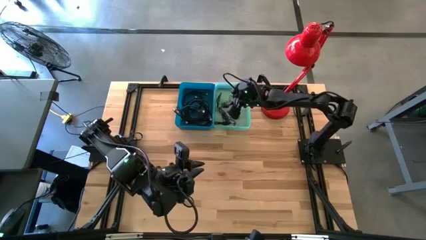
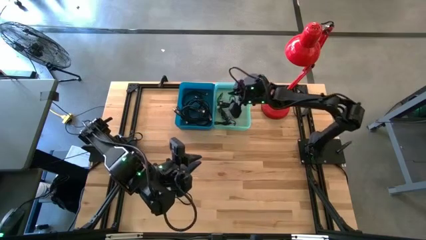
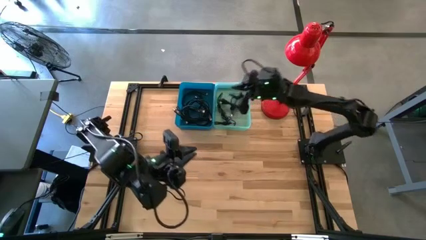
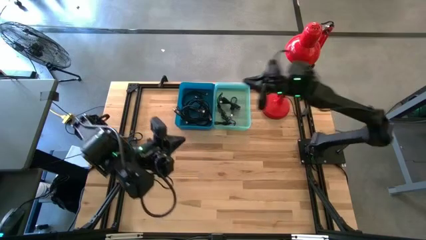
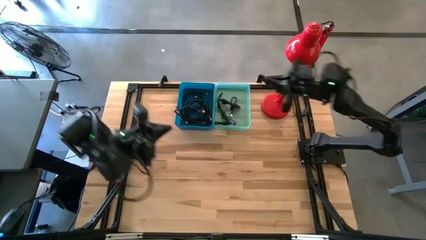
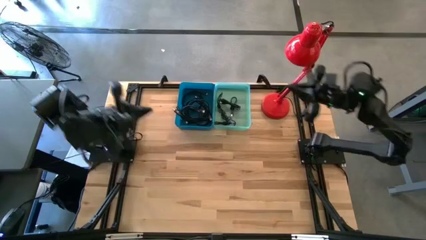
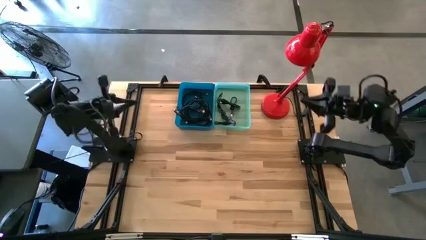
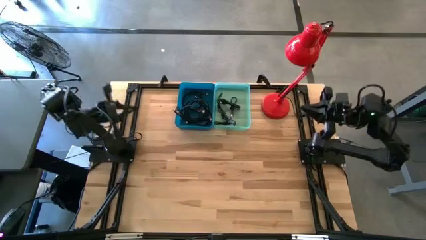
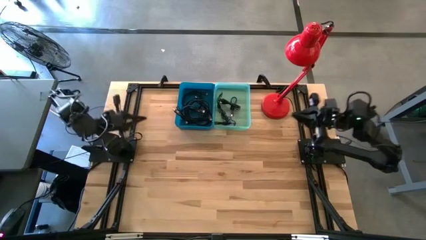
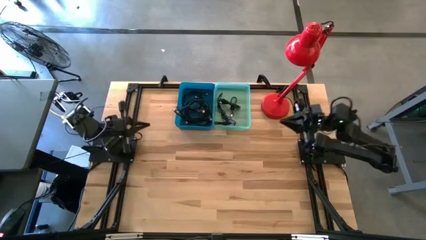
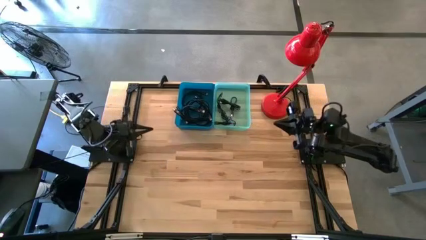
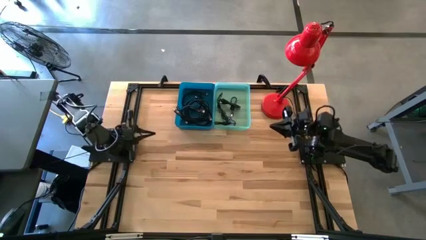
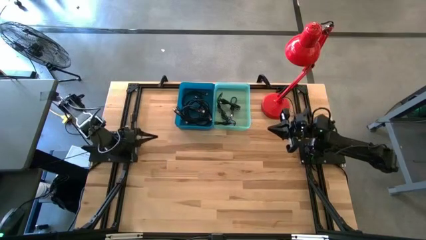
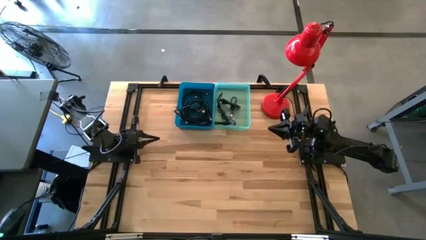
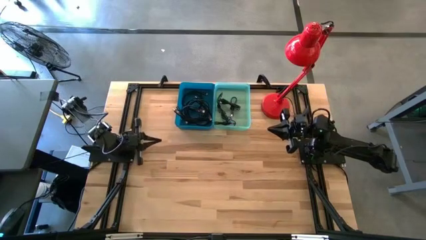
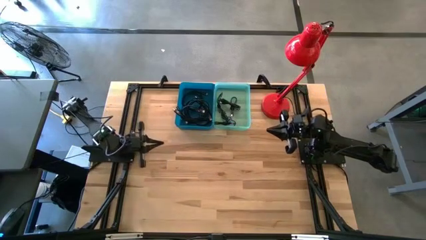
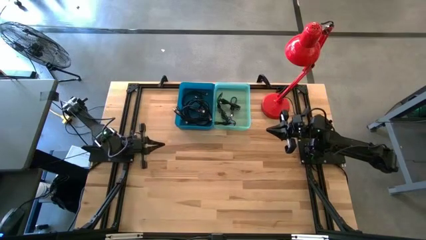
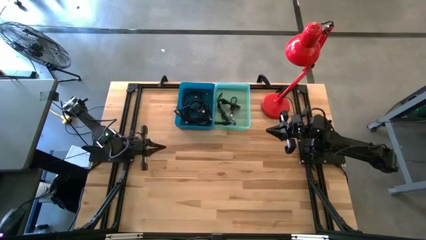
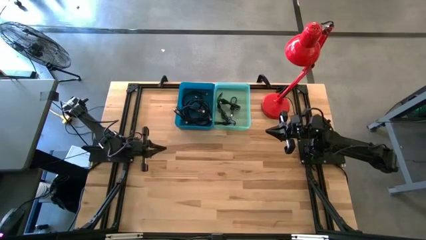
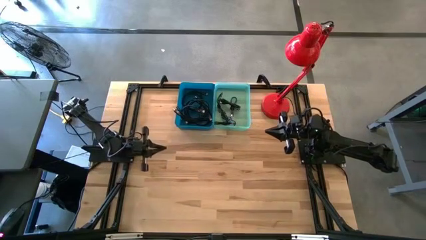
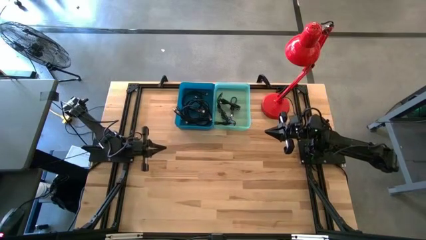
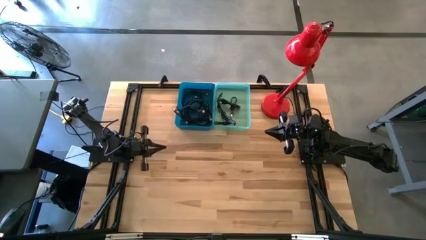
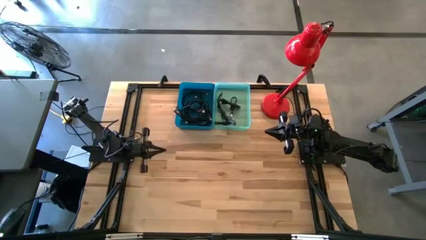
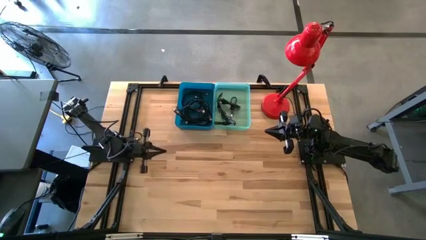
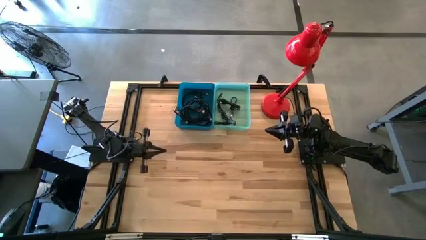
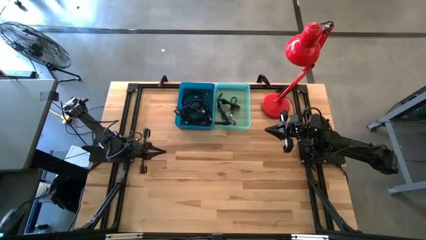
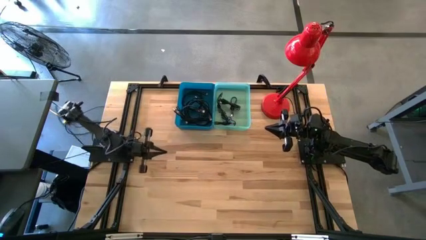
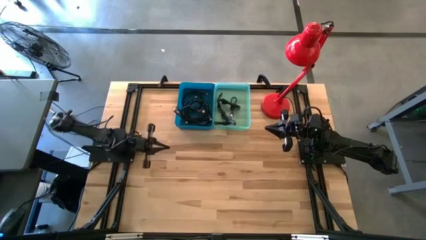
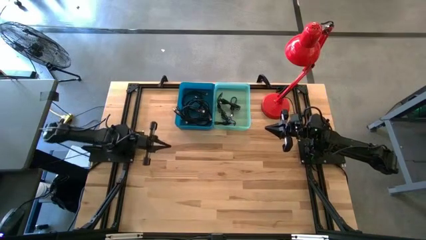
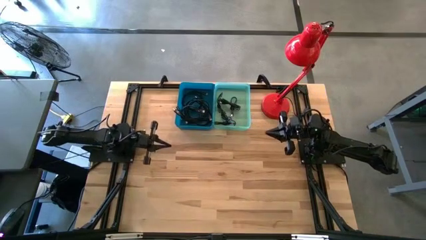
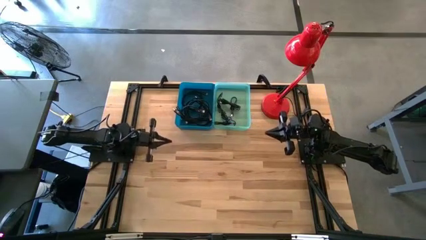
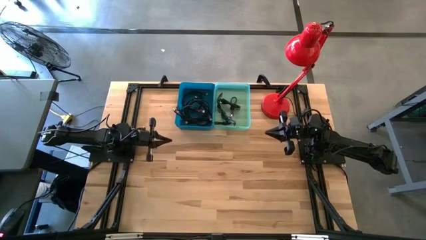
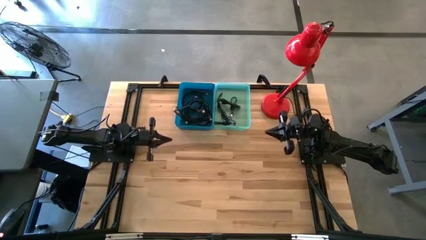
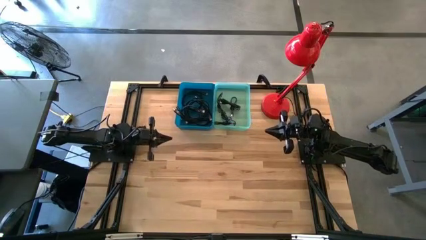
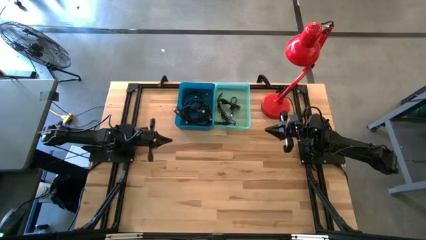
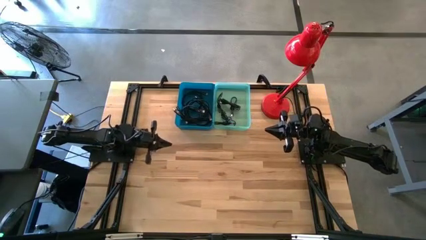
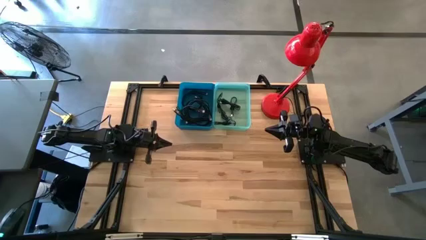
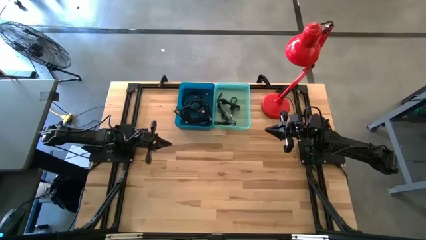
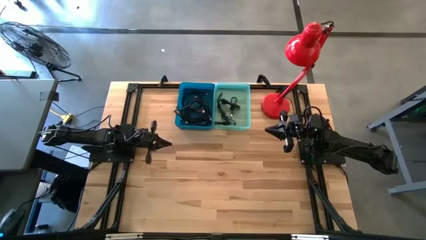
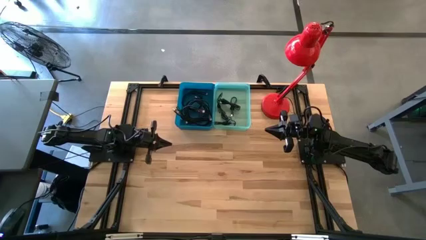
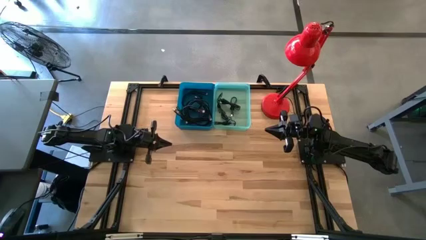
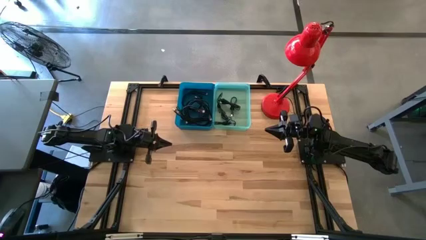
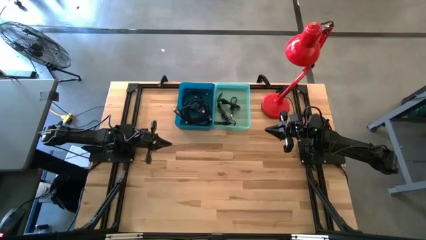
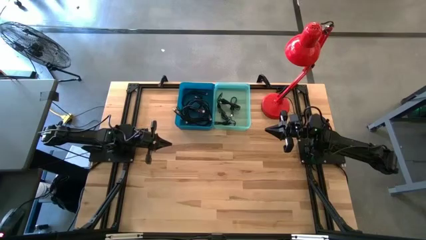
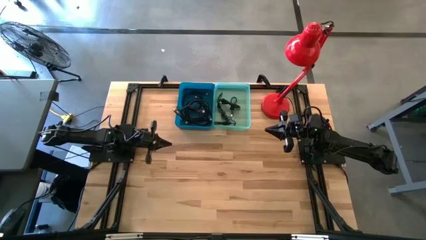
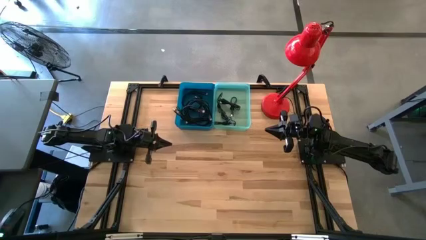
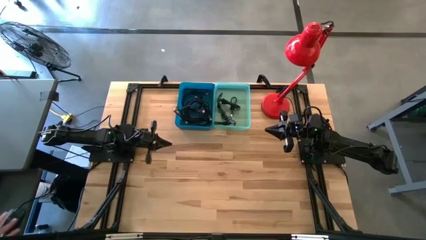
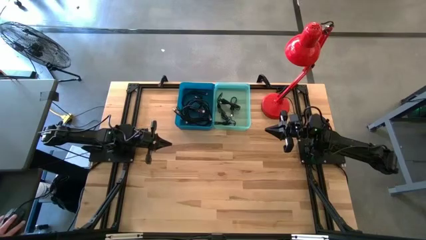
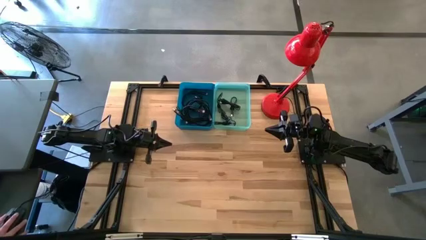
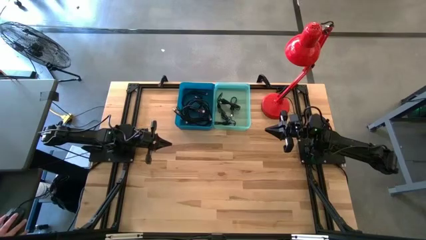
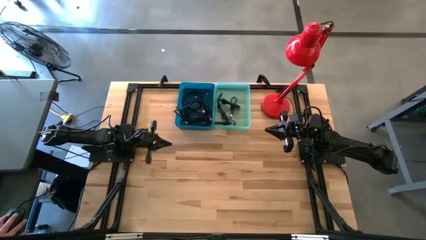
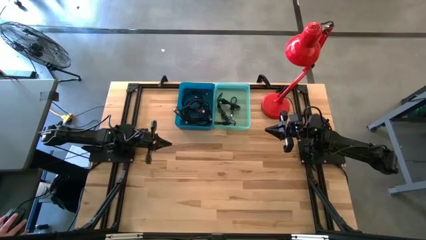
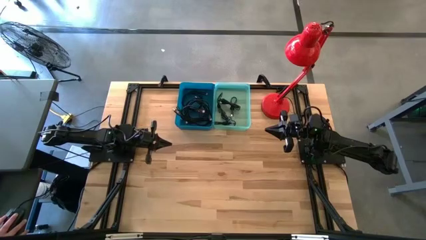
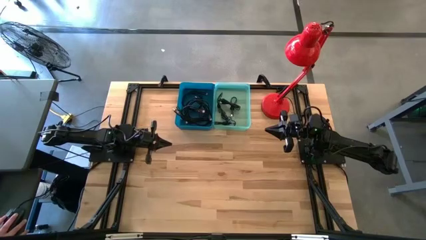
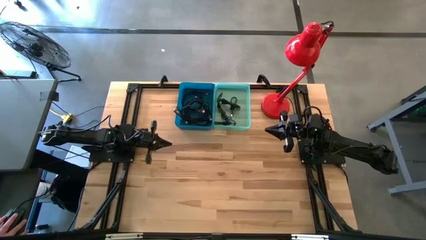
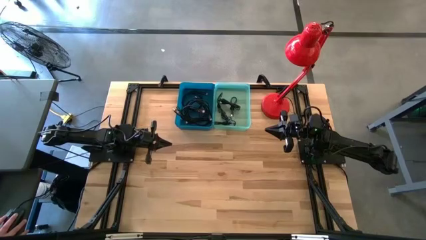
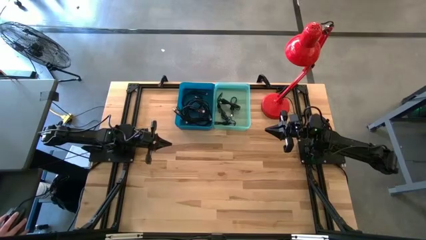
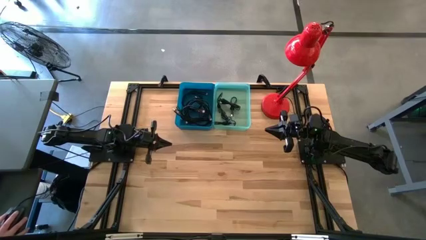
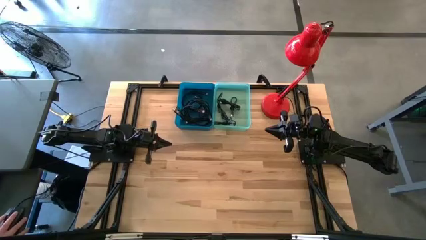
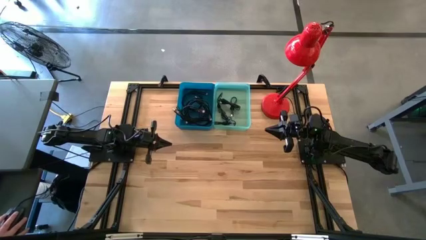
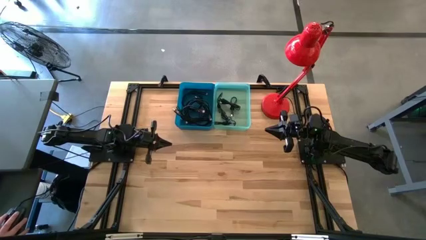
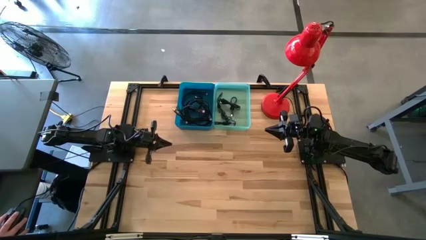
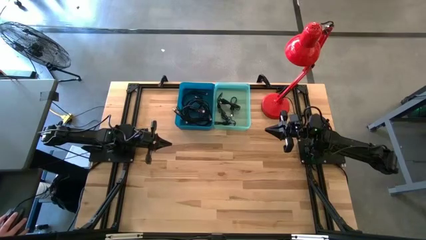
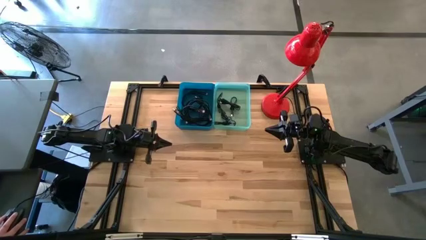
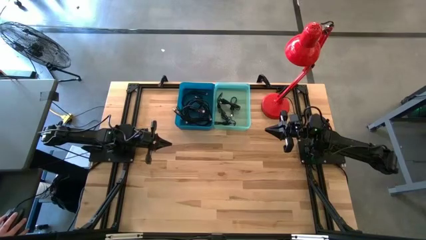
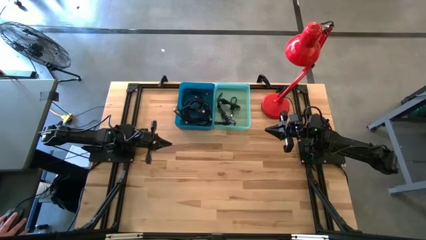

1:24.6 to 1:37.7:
Task: Pick & Place USB Port
Return to Home Position
